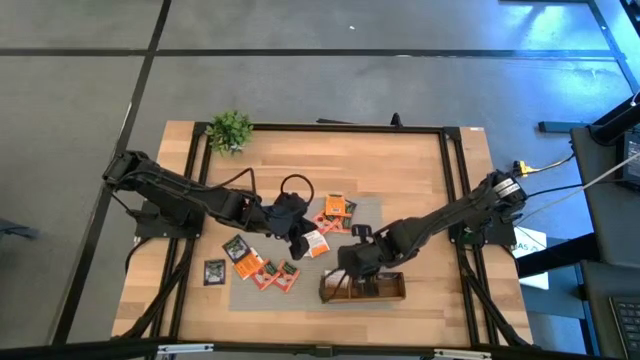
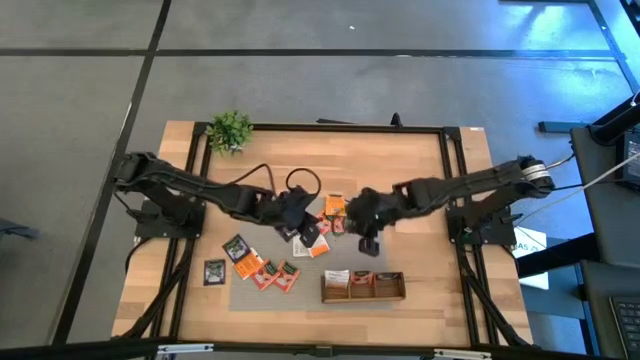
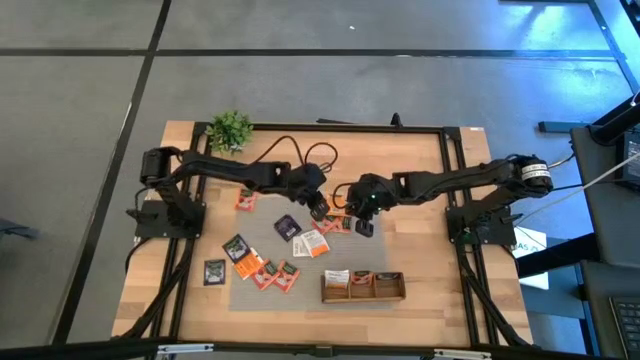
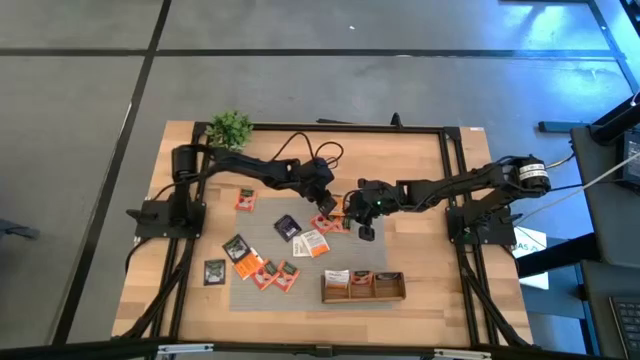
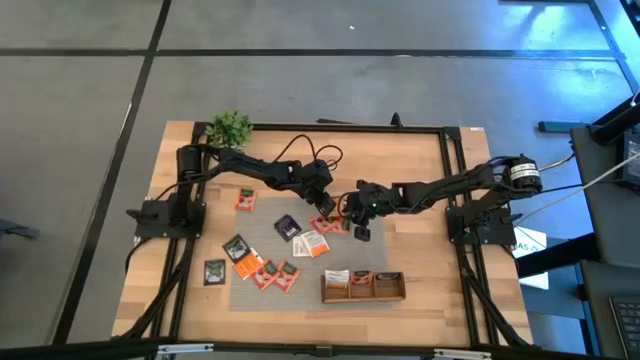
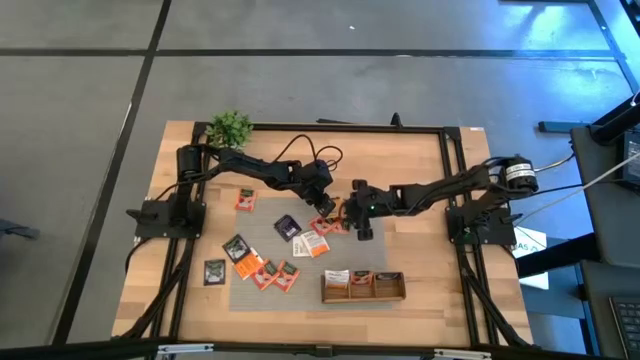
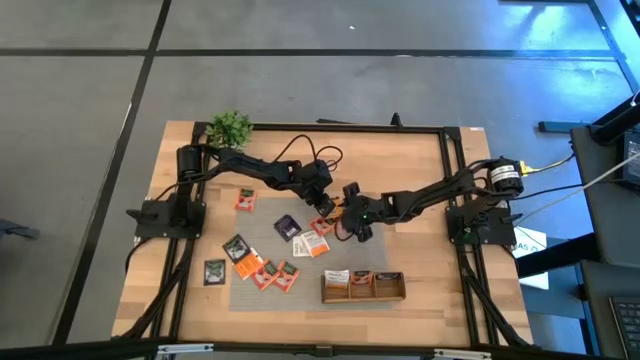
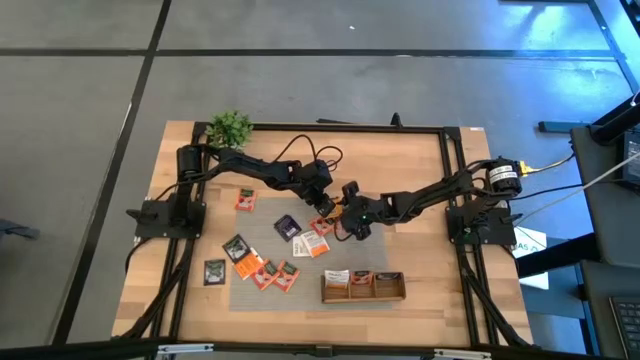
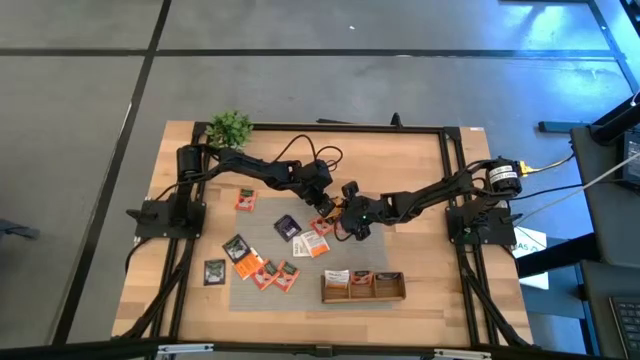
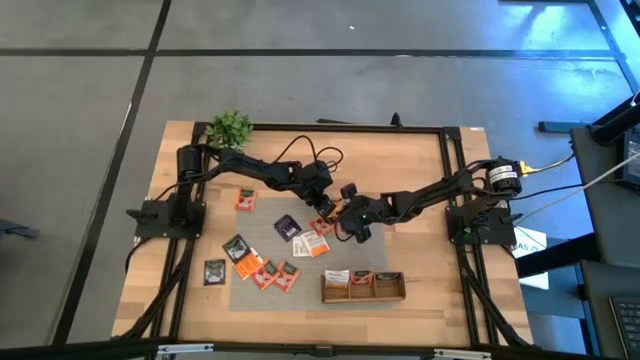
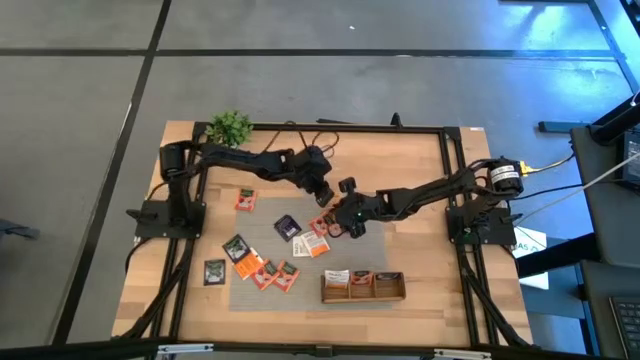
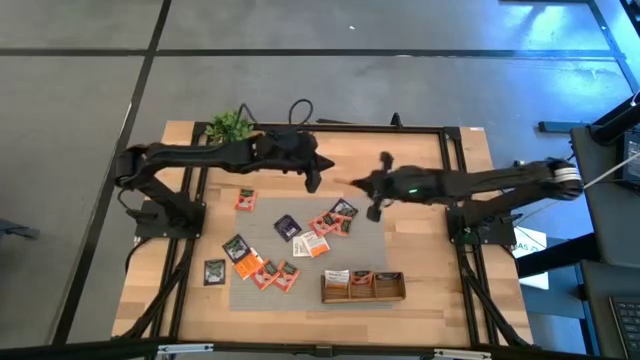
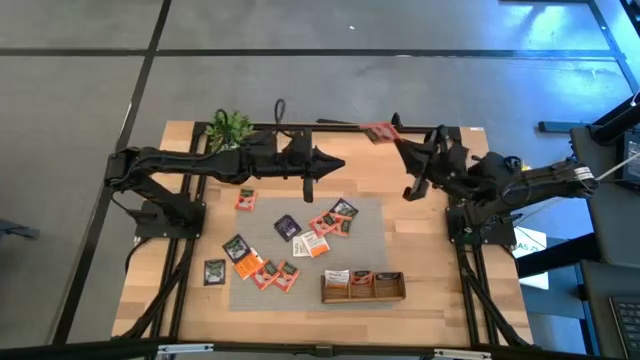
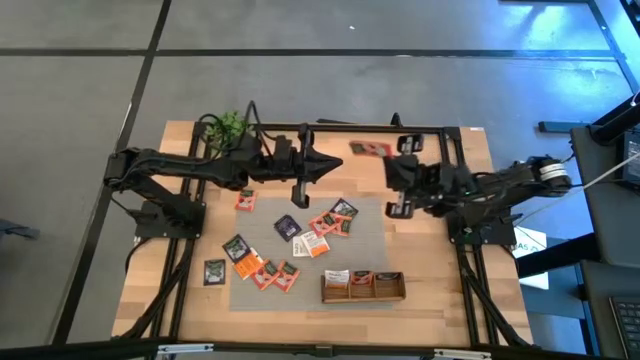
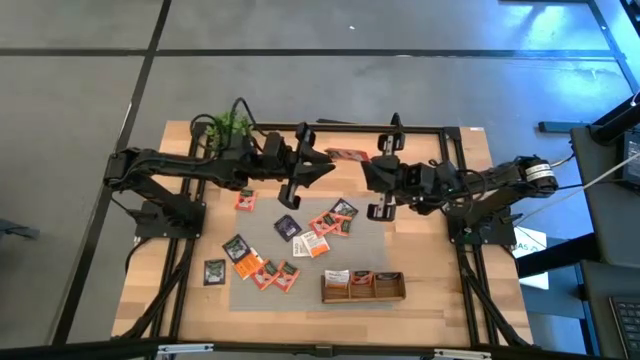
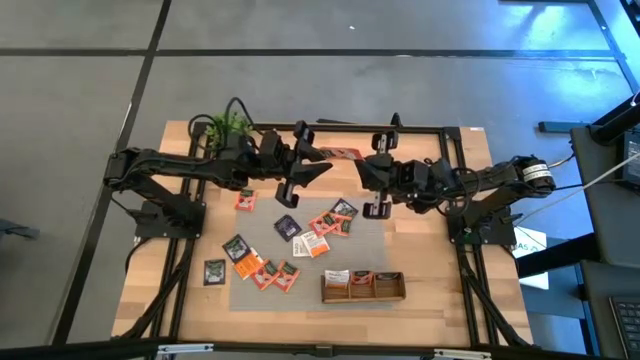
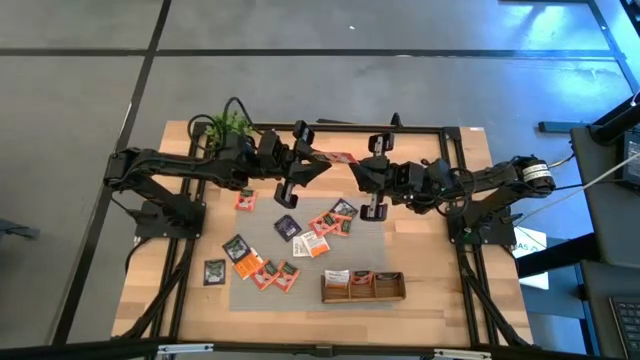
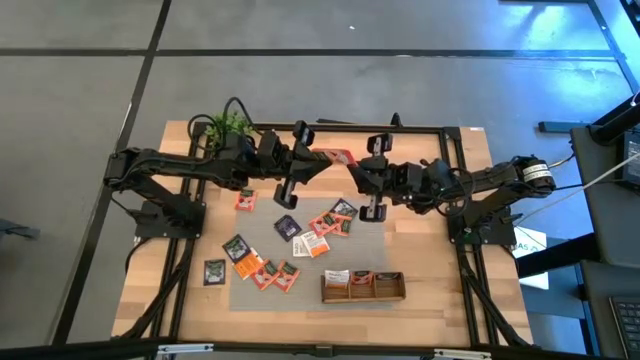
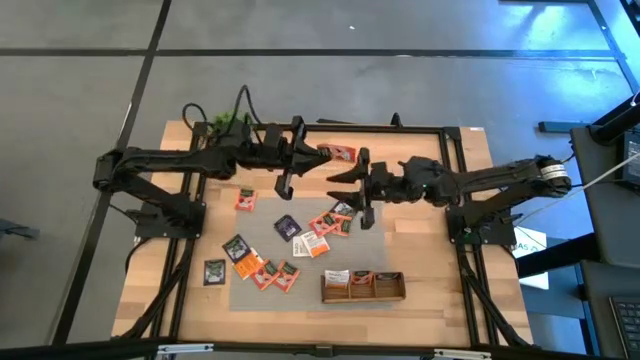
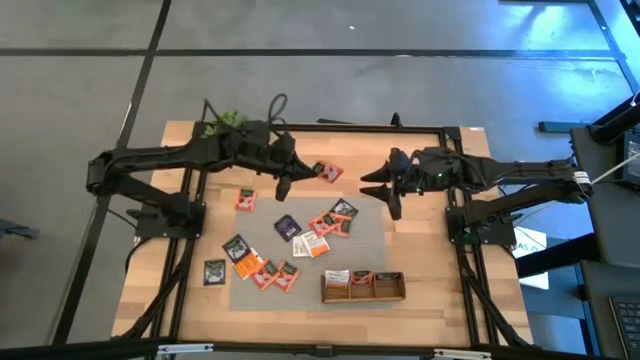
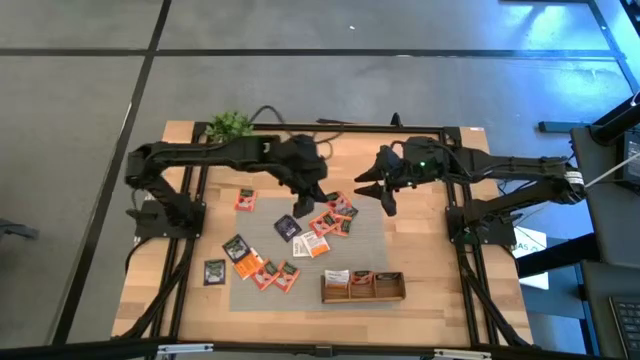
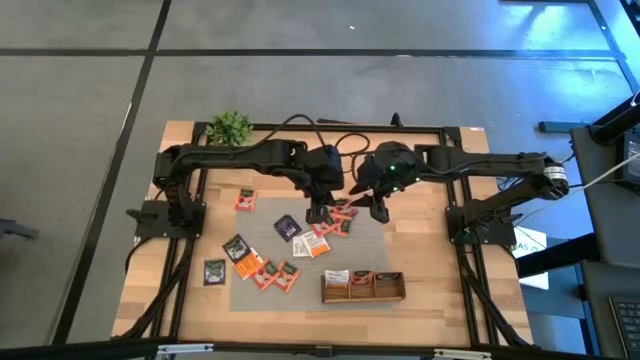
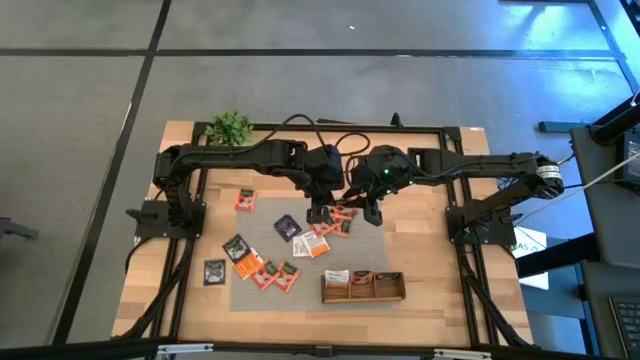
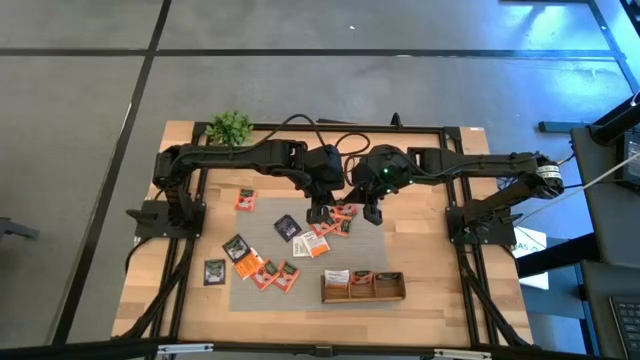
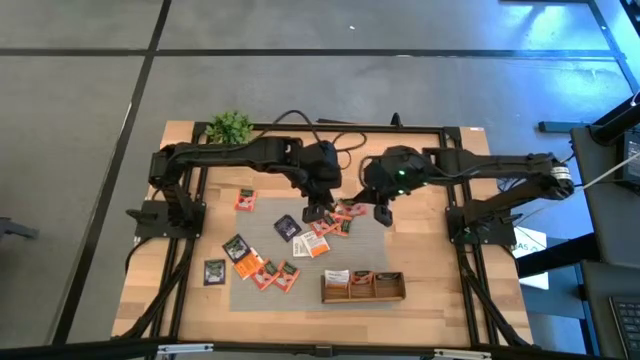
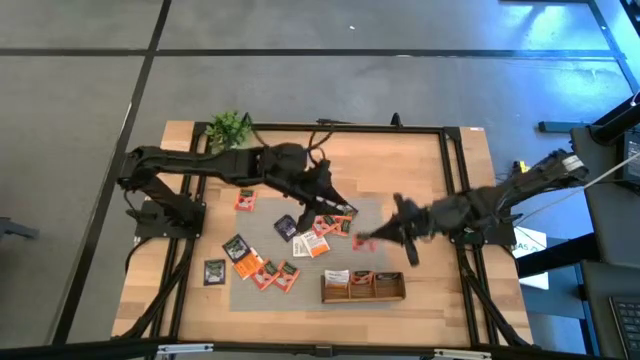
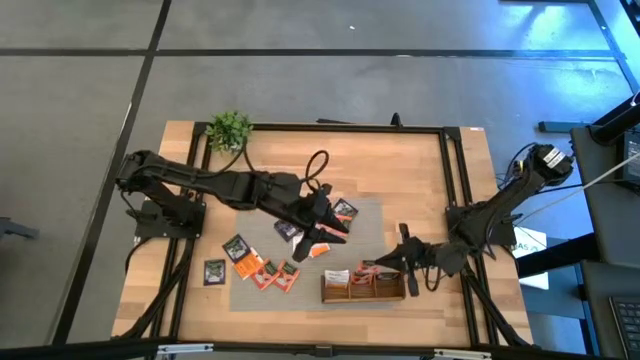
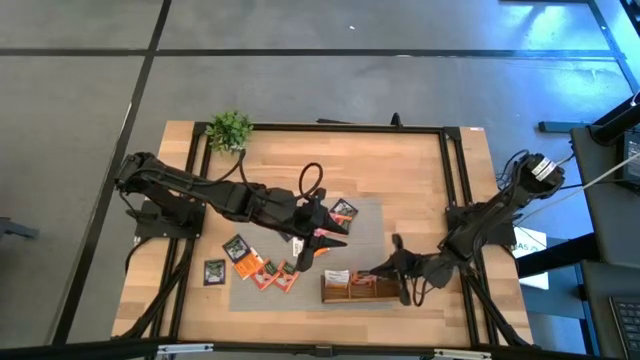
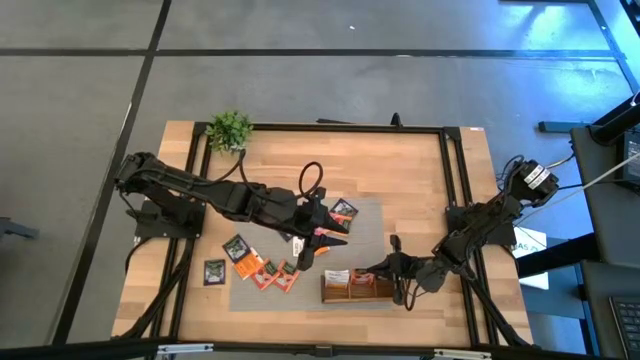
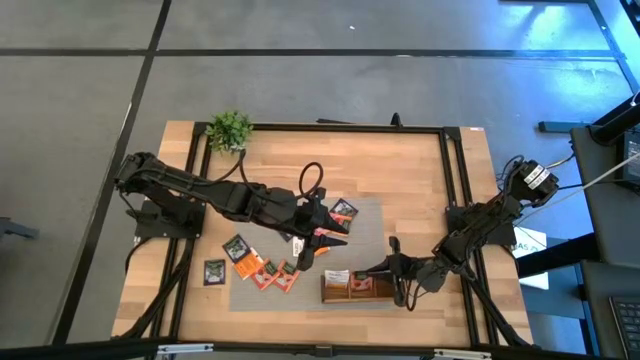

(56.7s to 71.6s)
Task: Pick & Place Tea
Put the yellow tea bag into the middle compartment of the wooden organizer

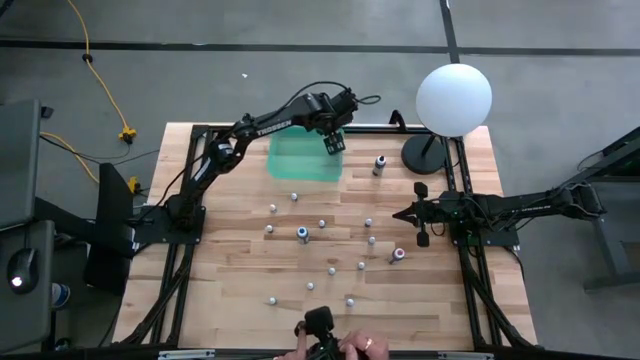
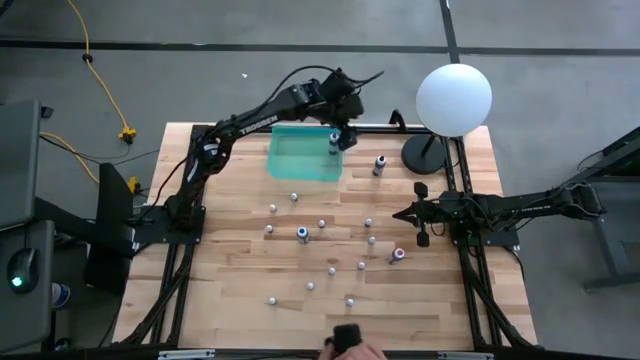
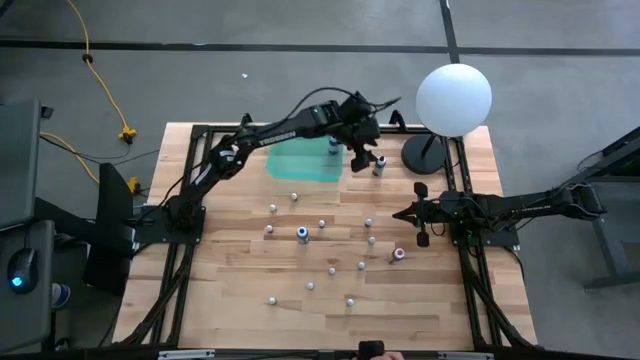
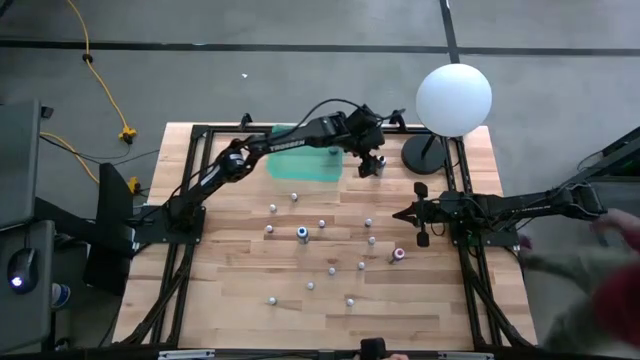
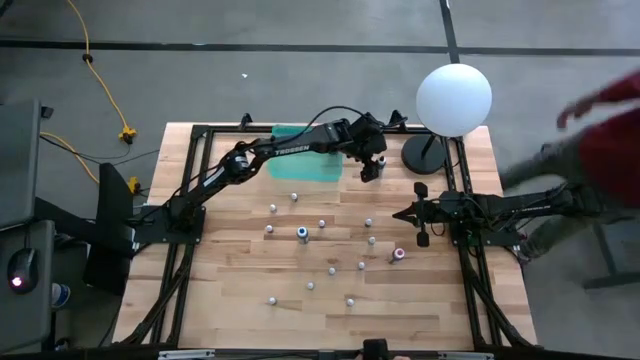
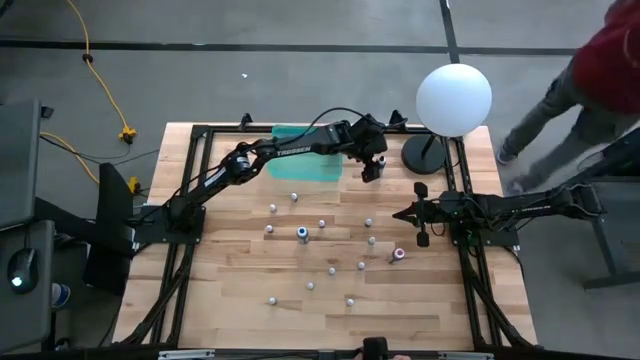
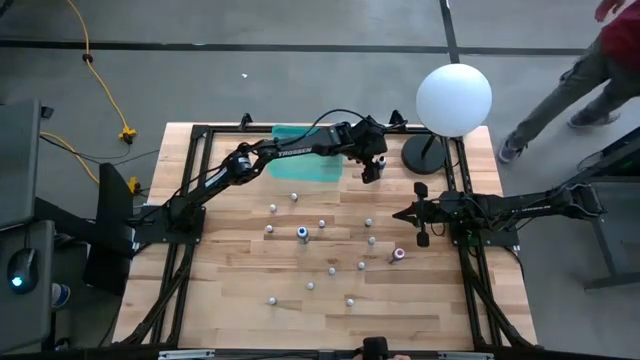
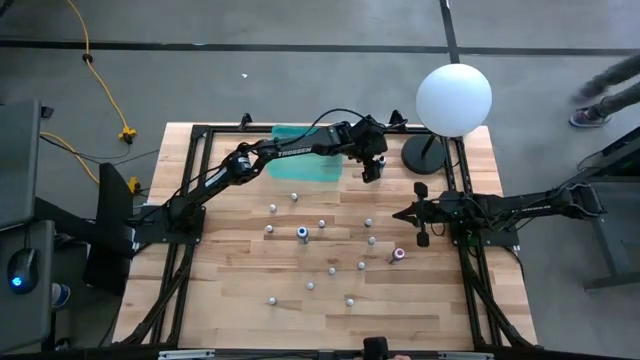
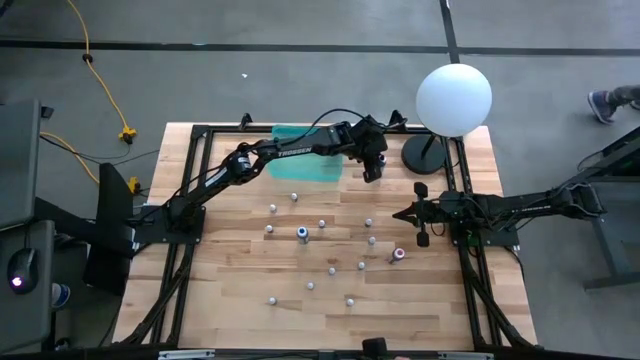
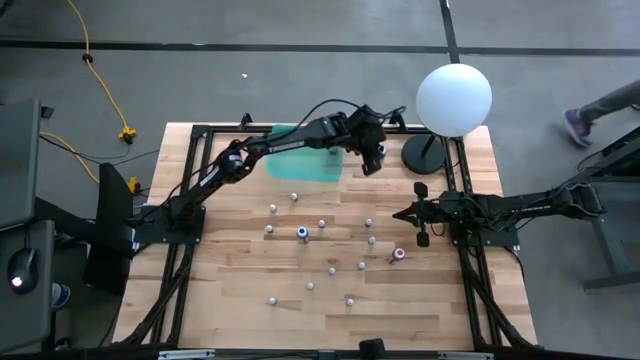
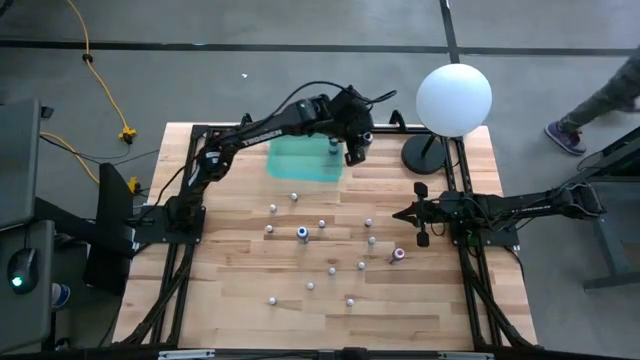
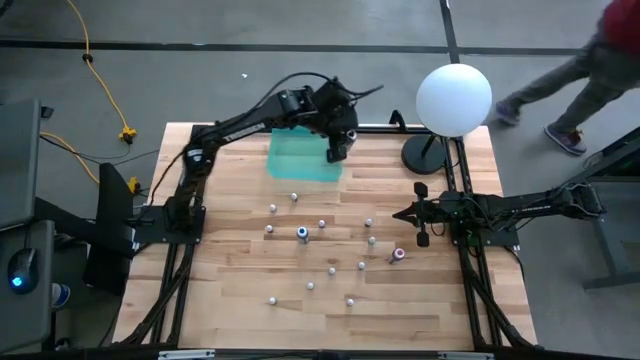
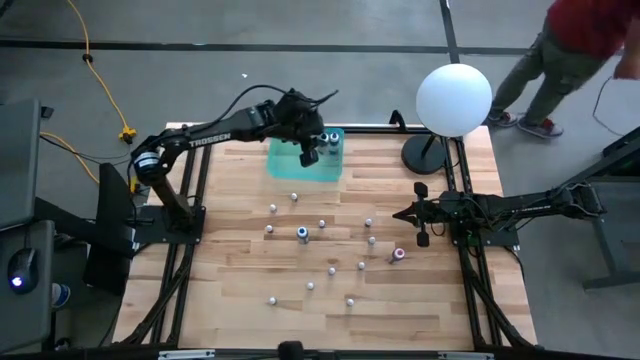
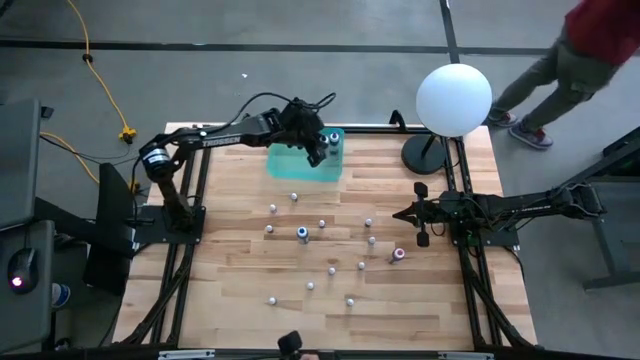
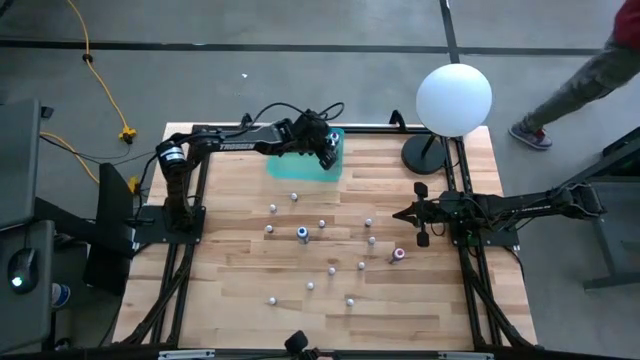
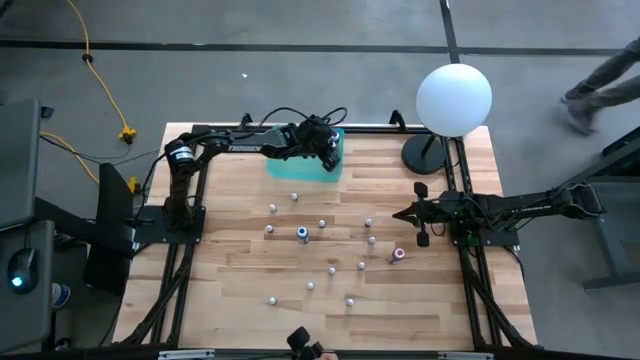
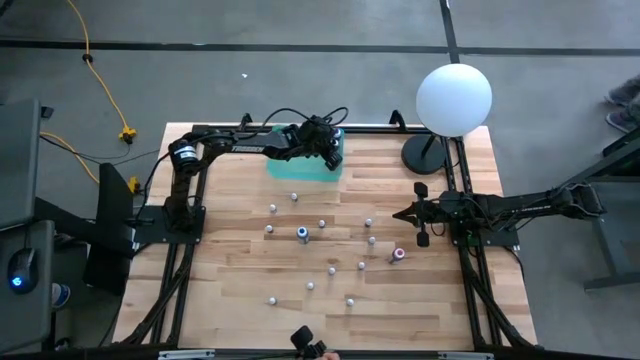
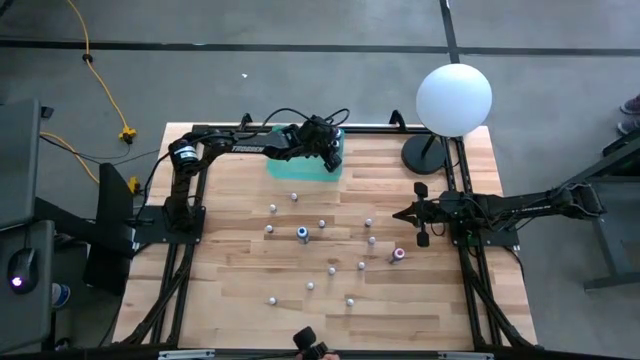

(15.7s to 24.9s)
Task: Pick & Place food coloring
Put the big black food coloring bottle into the blue transparent bin
